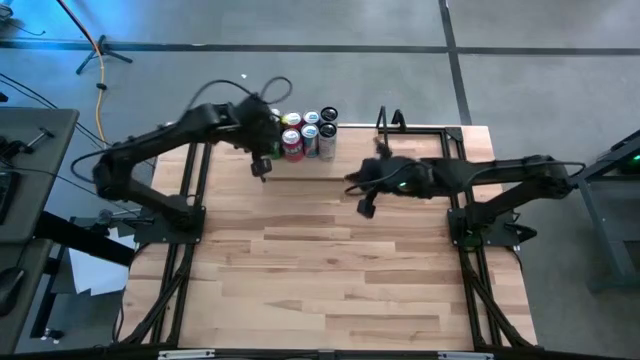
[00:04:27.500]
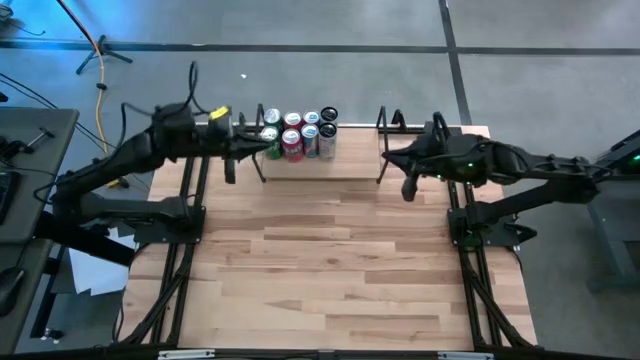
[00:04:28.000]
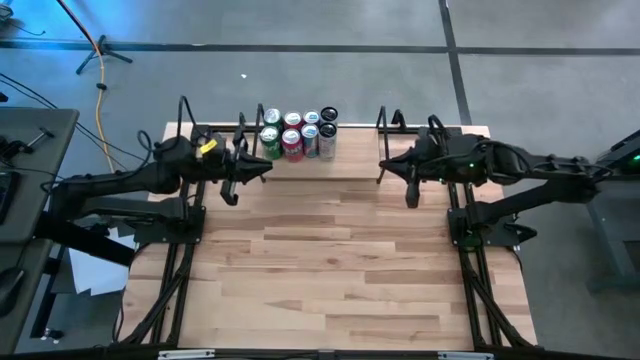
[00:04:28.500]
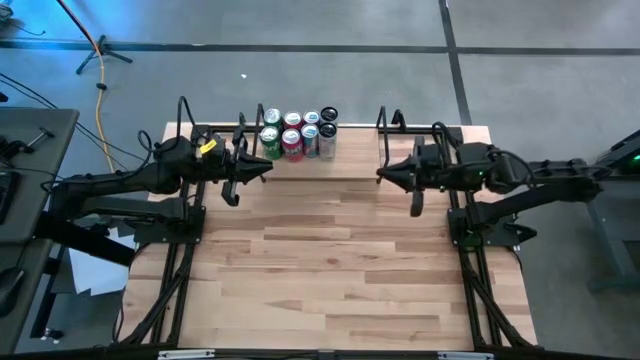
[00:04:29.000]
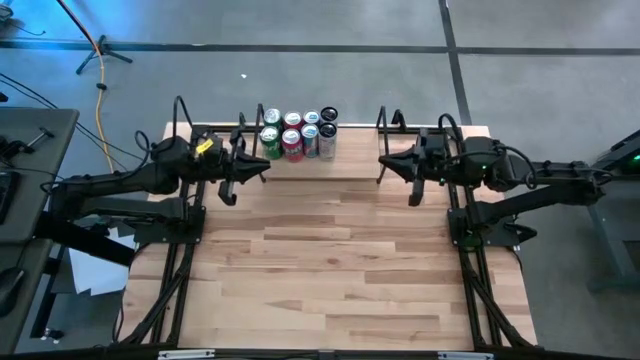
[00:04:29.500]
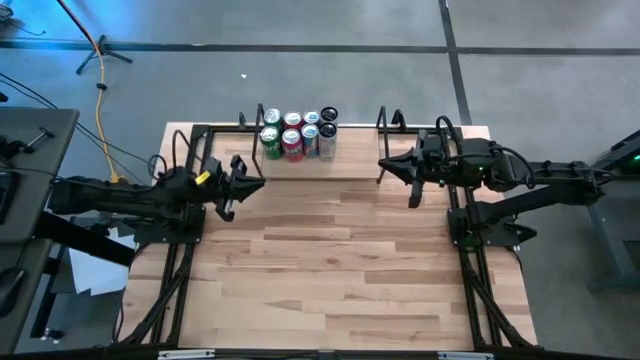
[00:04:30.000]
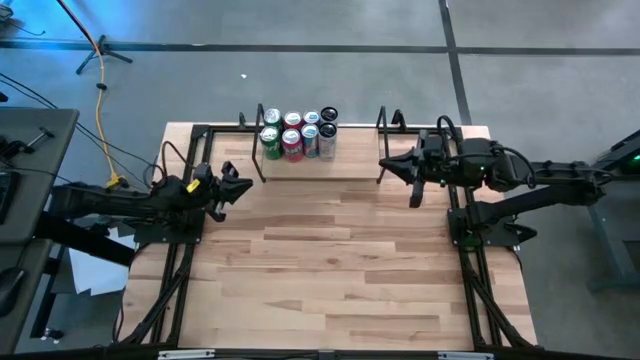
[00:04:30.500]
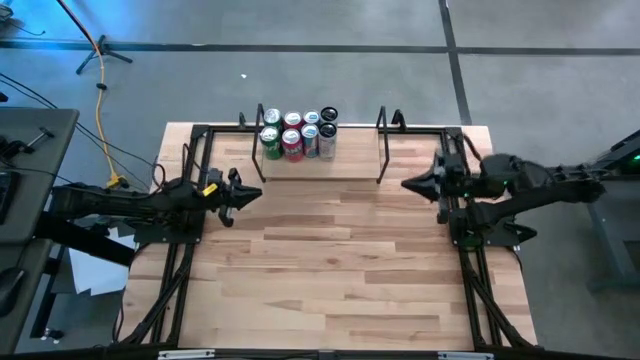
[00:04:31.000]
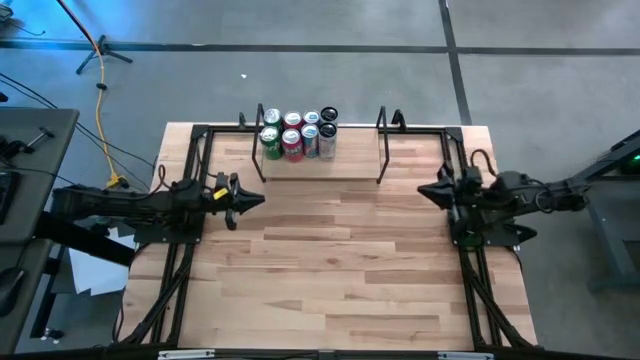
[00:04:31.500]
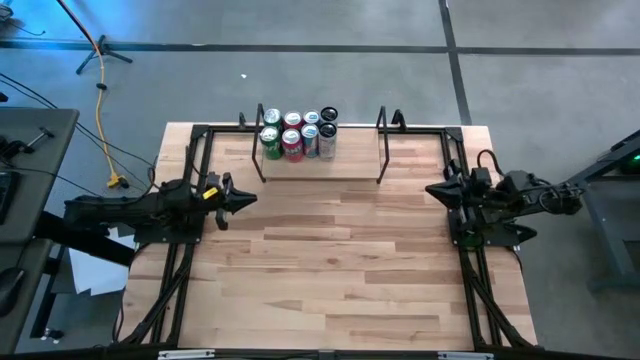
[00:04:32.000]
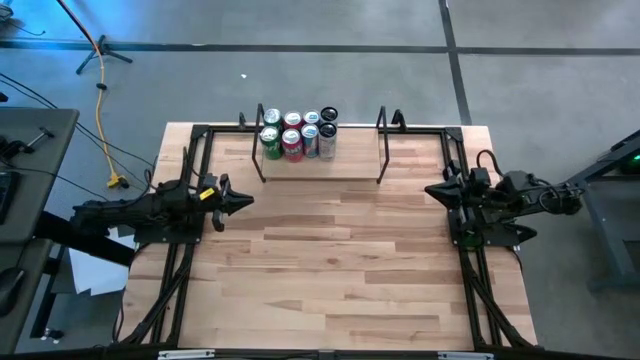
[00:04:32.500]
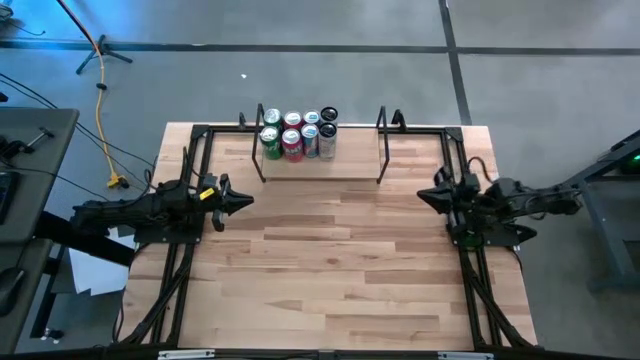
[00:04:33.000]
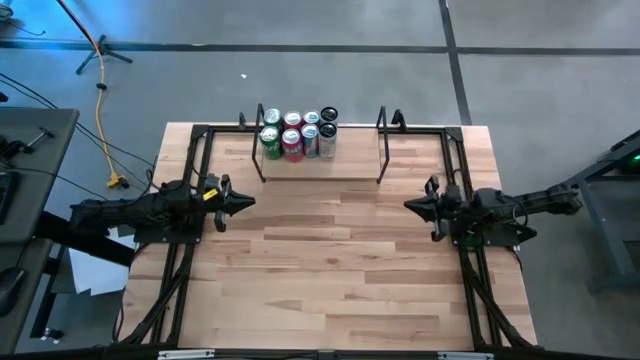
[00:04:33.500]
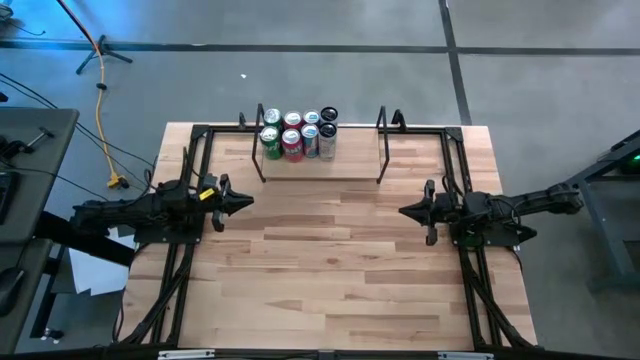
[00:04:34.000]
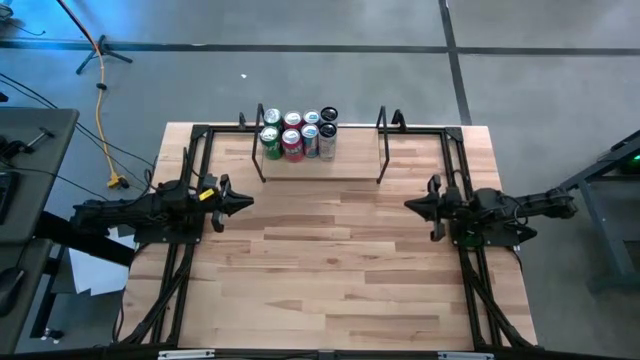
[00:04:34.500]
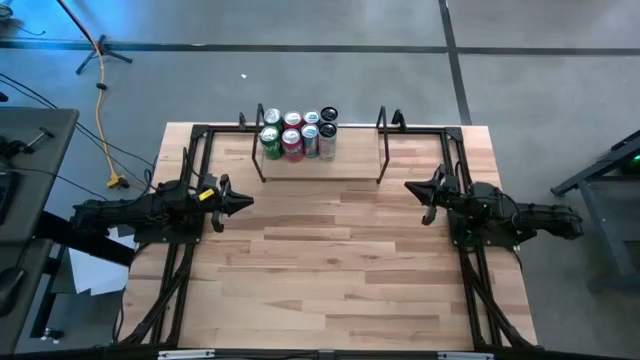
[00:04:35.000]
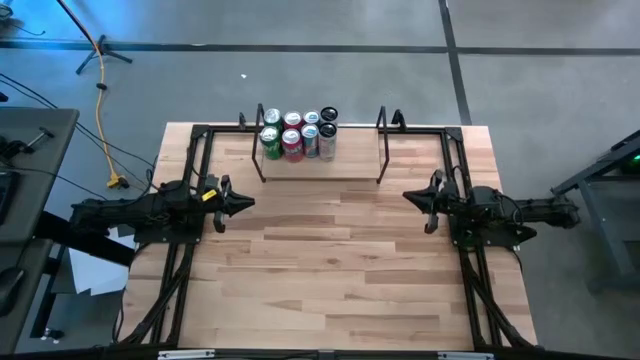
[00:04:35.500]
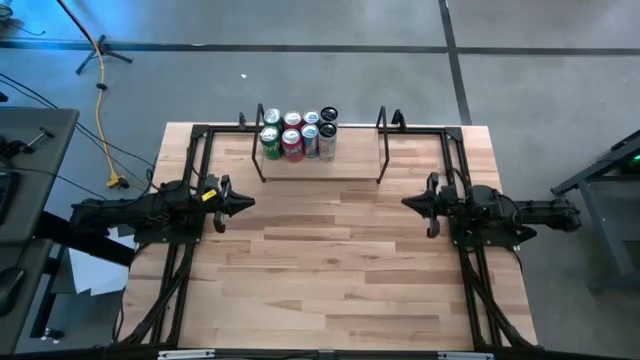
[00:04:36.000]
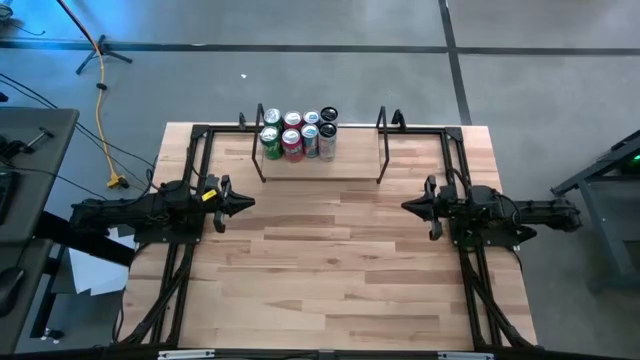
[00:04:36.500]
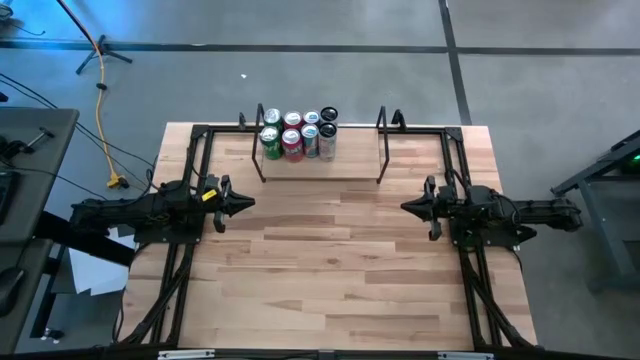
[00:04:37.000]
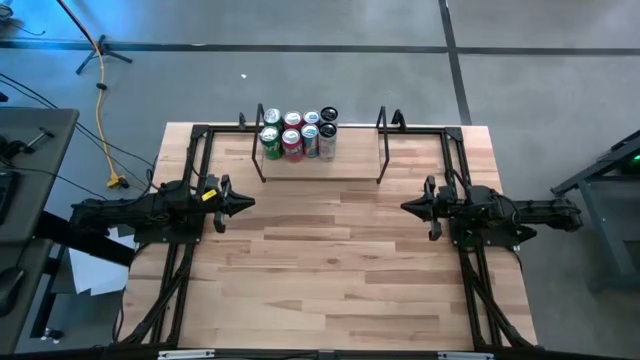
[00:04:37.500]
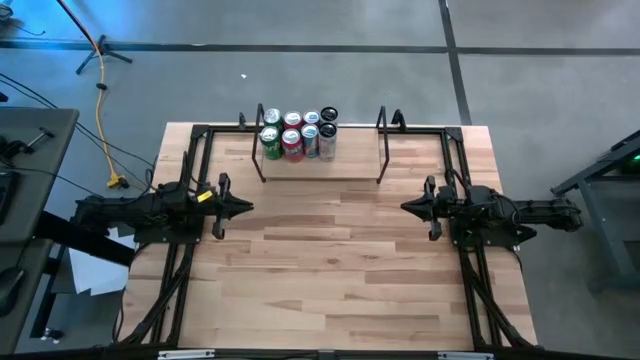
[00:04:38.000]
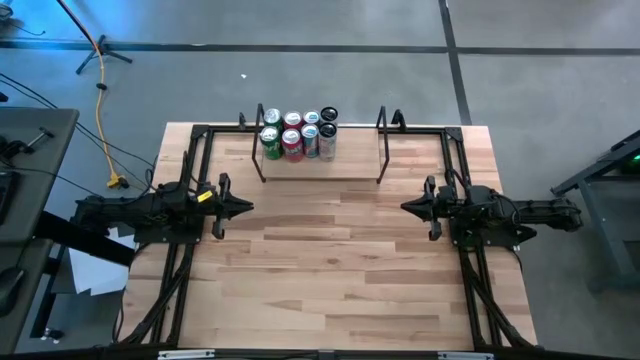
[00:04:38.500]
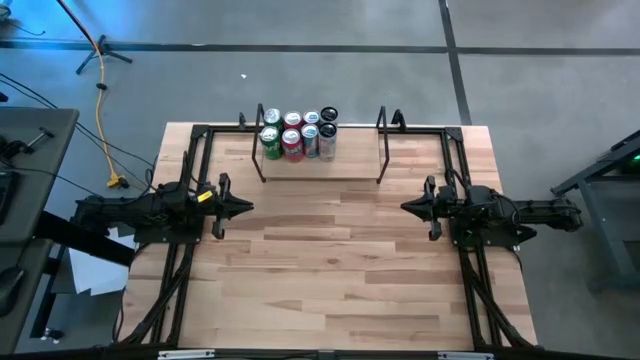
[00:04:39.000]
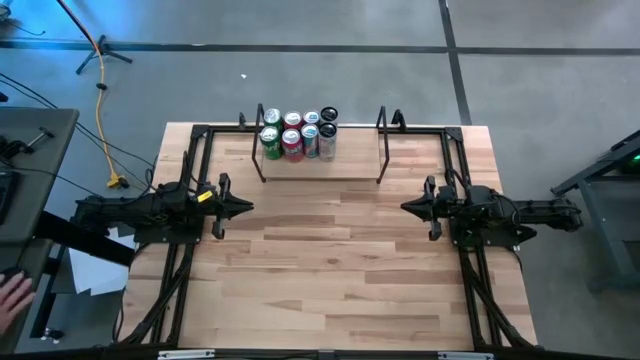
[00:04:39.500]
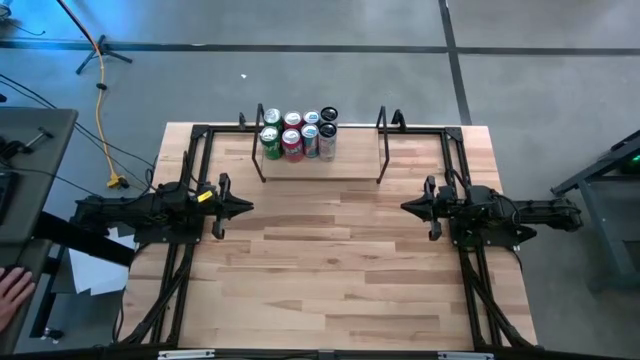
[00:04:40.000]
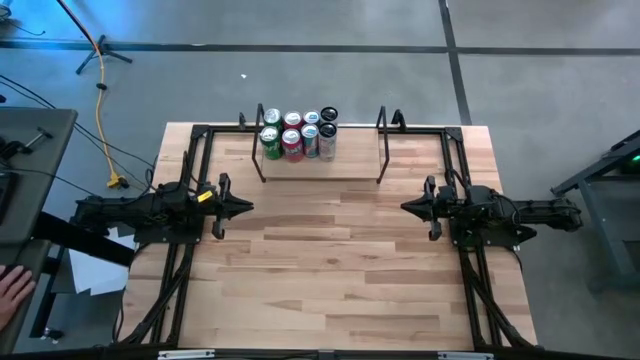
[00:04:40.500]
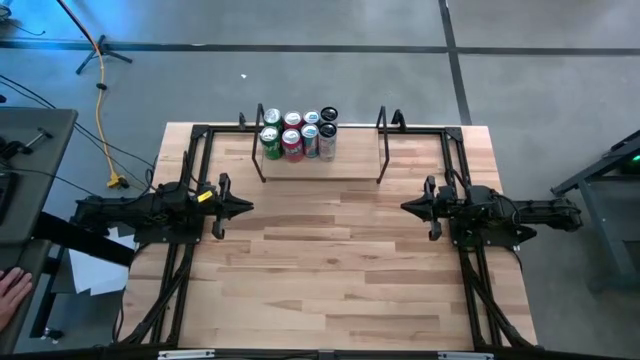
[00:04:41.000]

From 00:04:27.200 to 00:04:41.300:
Task: Place canned beverage on shelf
Return to Home Position

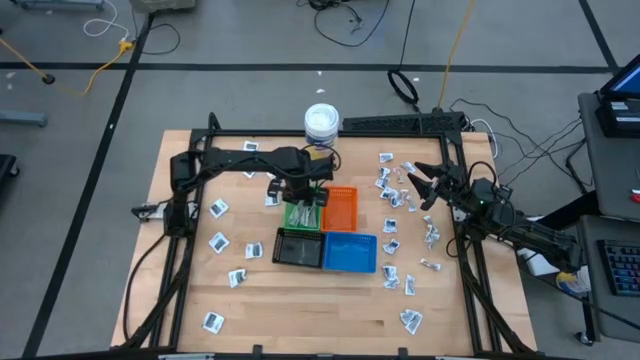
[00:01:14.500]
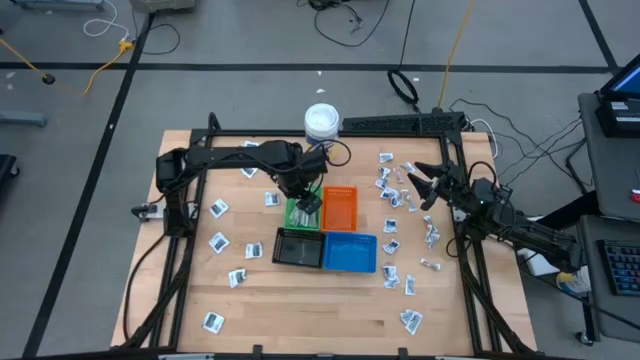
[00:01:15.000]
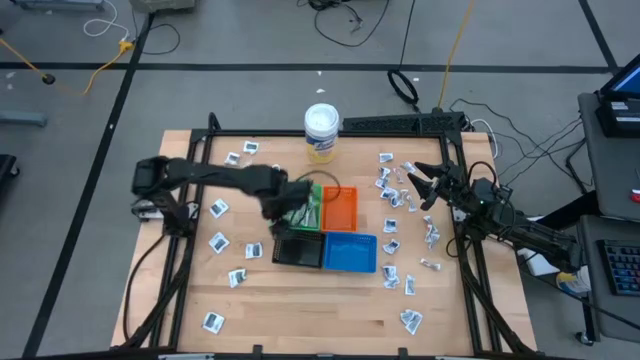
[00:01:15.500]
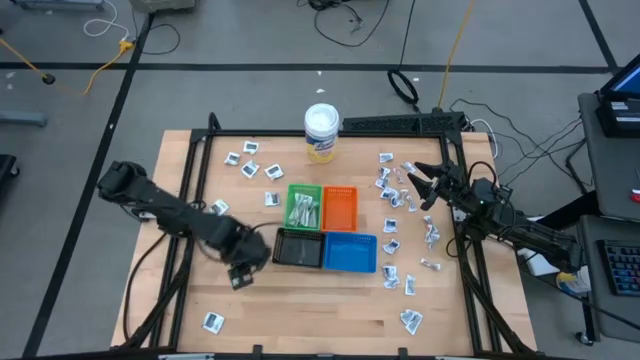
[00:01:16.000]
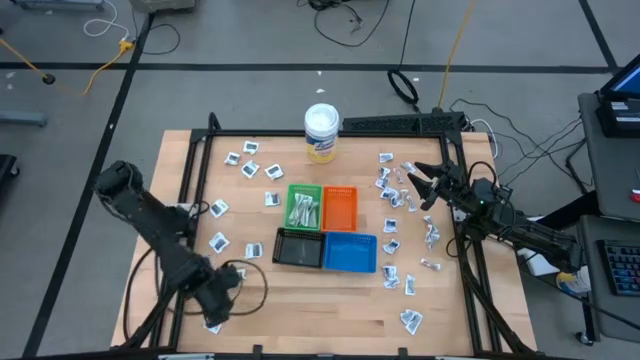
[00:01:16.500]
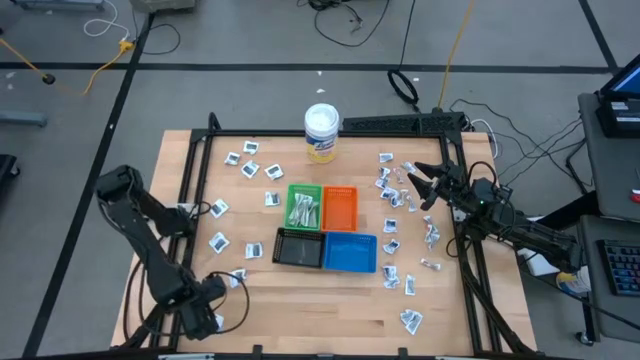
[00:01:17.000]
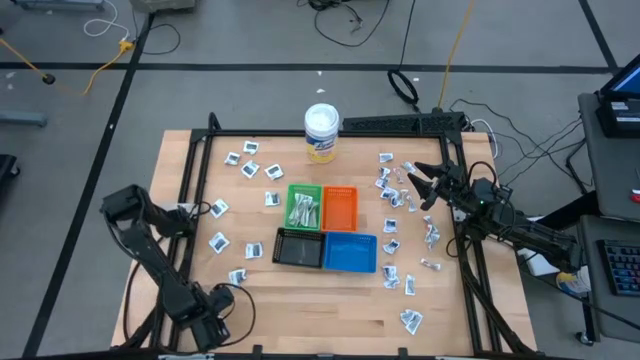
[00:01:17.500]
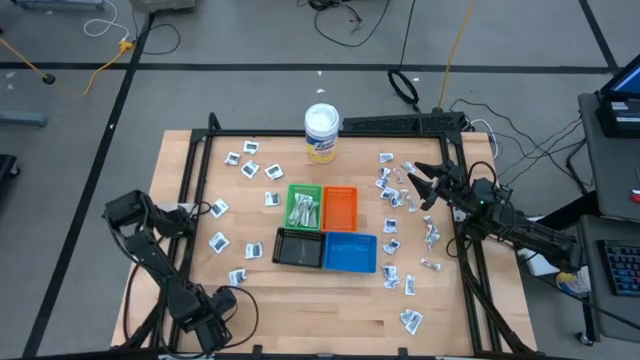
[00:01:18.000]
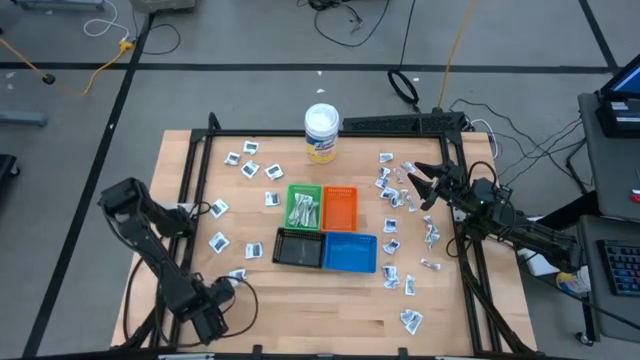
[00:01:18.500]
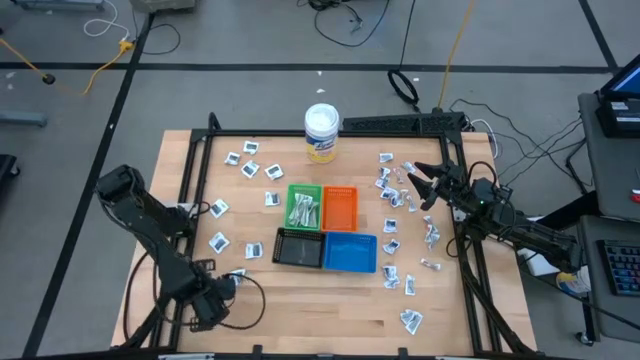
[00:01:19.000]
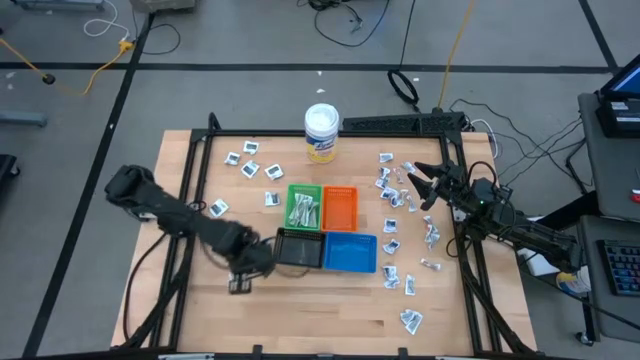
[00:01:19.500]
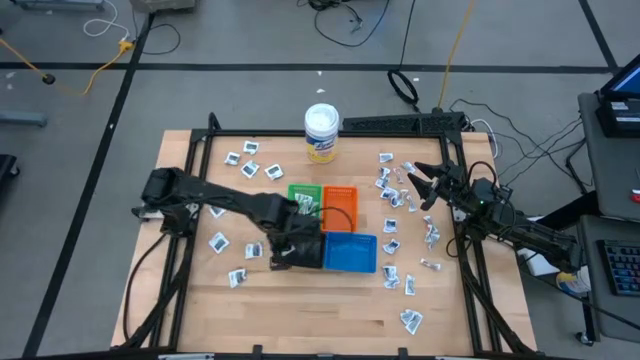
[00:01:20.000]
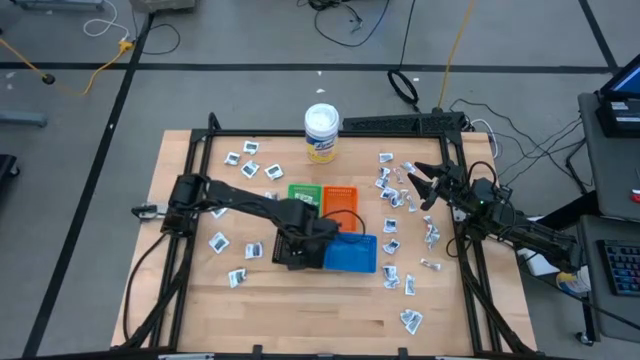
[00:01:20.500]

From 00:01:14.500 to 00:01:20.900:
Task: Pick & Place First Aid Supplies
Put the towelette pack into the black bin
